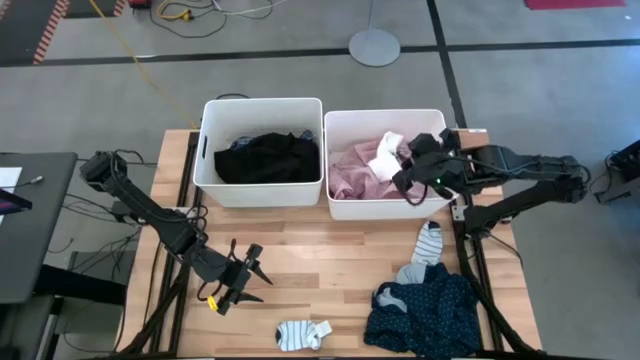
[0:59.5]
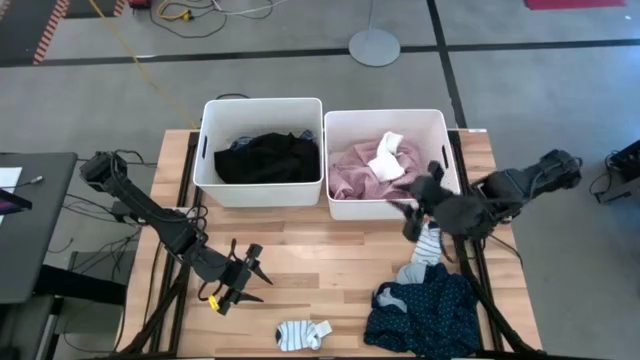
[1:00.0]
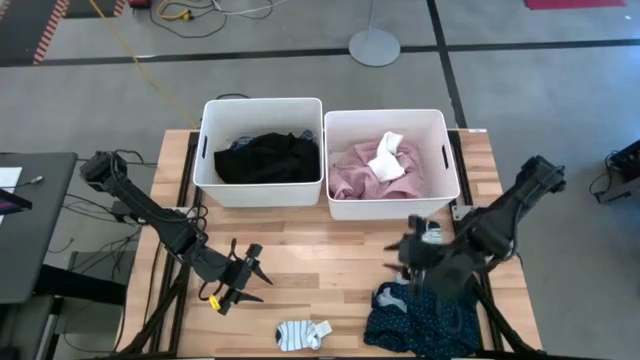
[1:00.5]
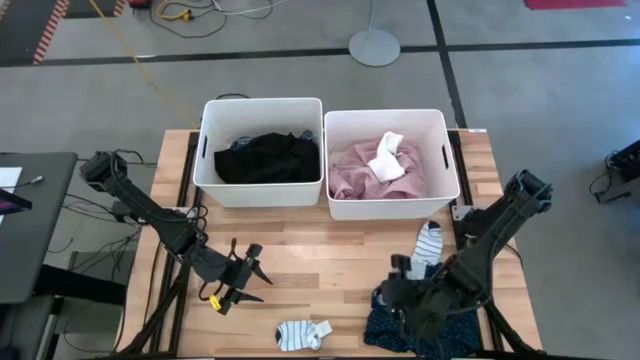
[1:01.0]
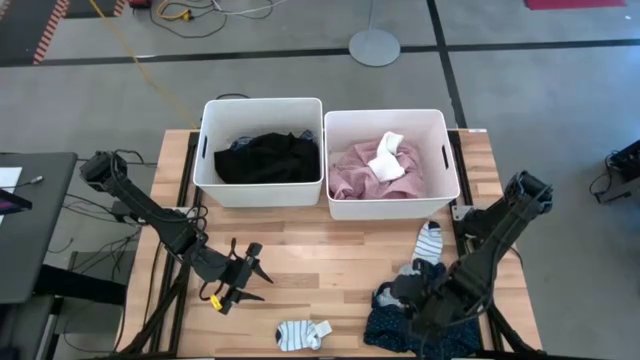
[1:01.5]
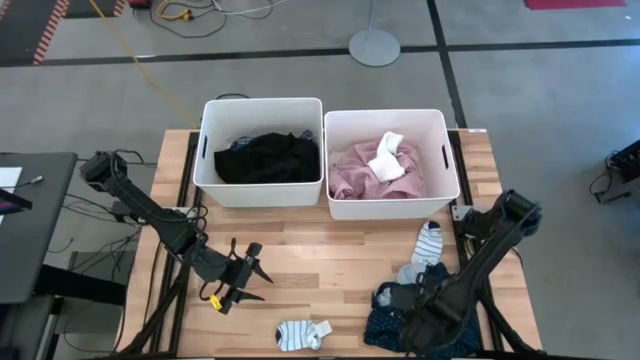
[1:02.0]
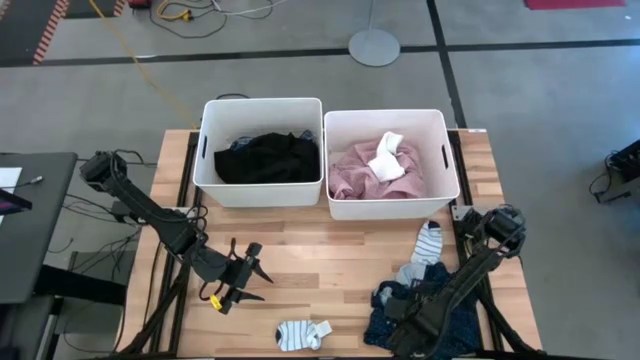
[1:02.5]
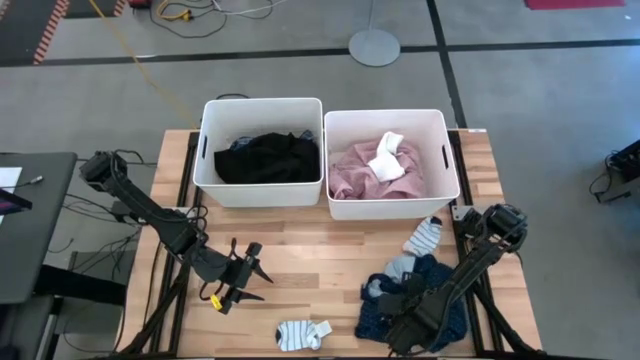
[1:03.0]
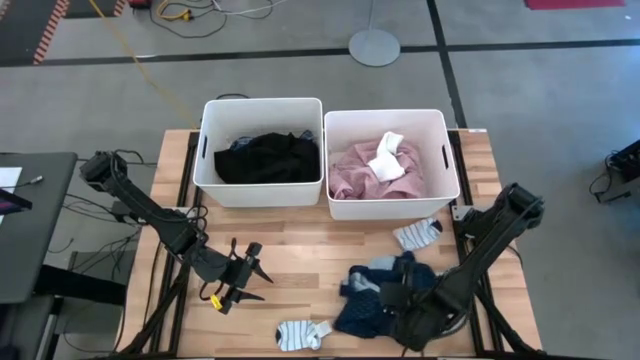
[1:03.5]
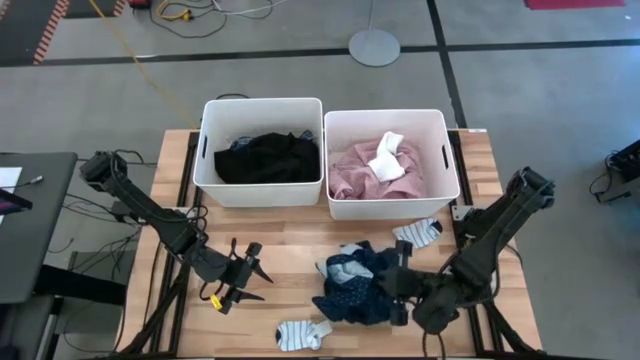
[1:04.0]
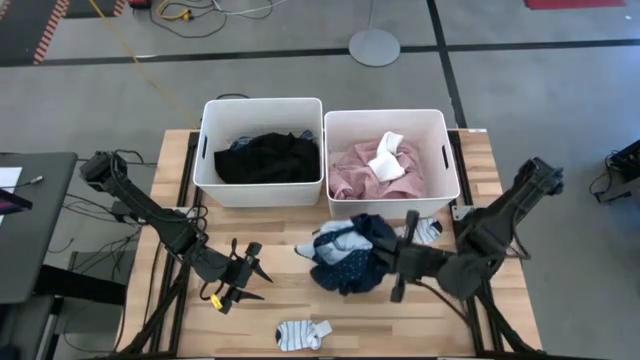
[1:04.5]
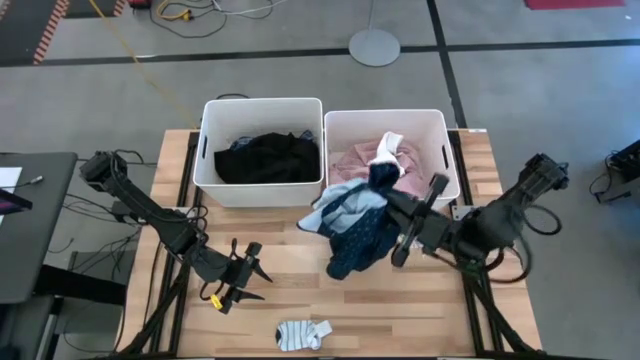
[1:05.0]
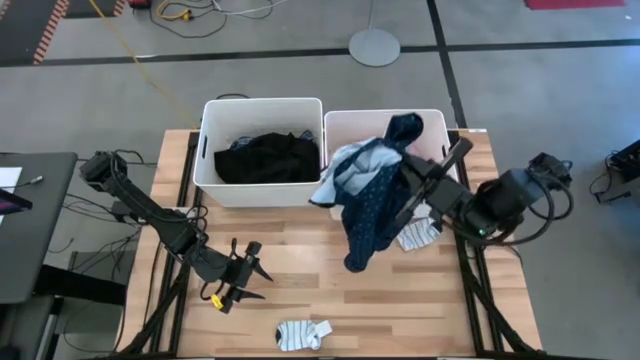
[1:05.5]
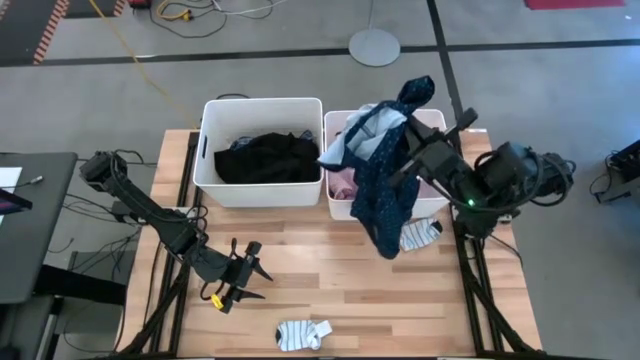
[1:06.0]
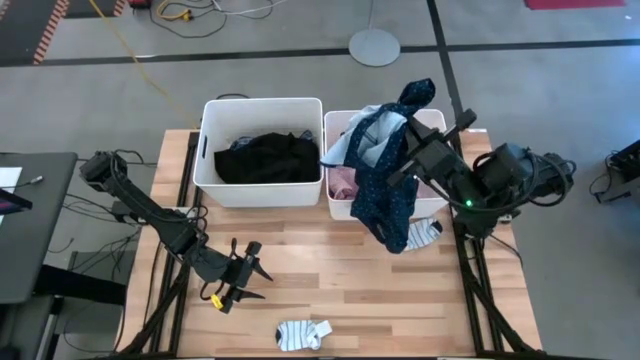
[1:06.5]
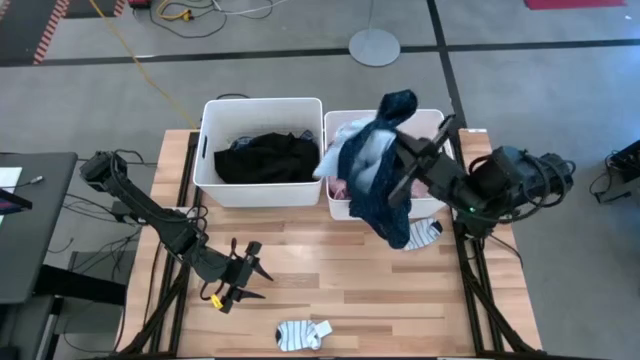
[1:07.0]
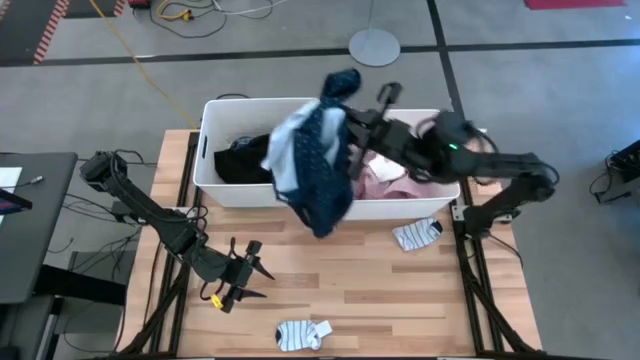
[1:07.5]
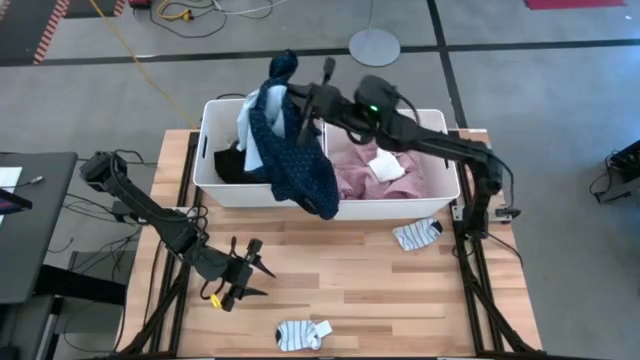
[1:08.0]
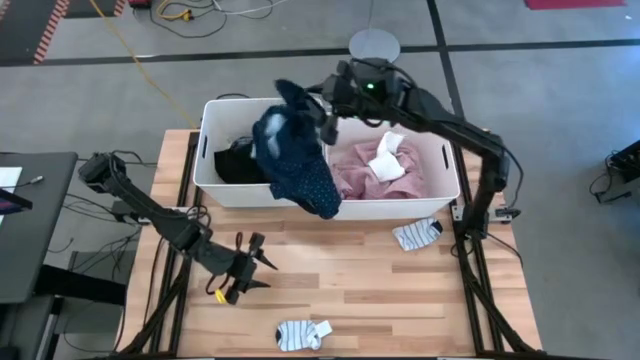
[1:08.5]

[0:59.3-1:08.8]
Task: Sort clothes
Put the blue shirt into the left white laundry organizer

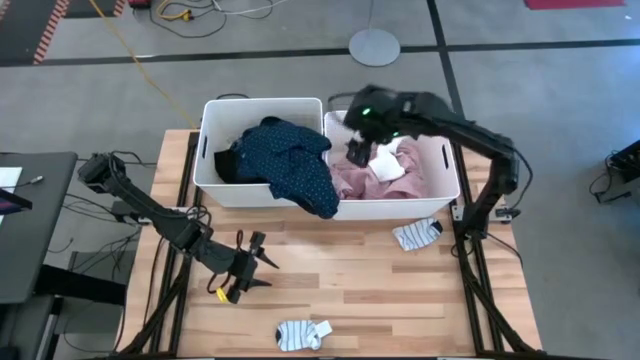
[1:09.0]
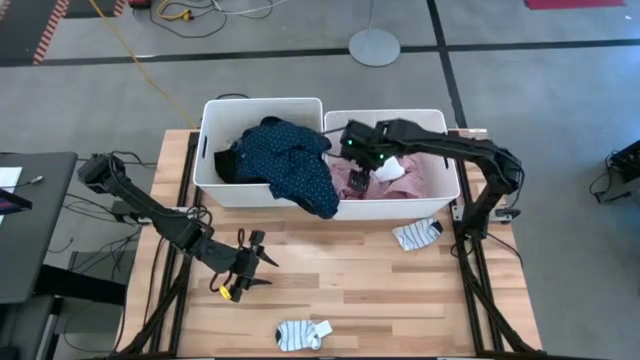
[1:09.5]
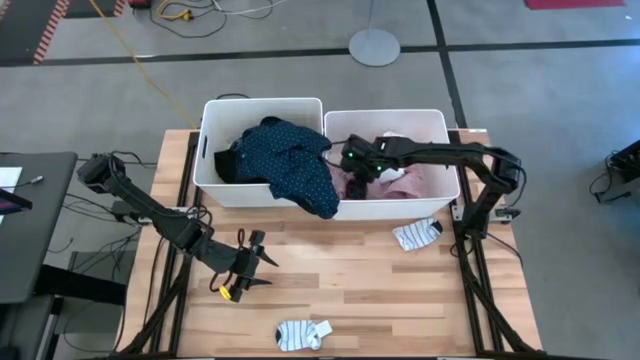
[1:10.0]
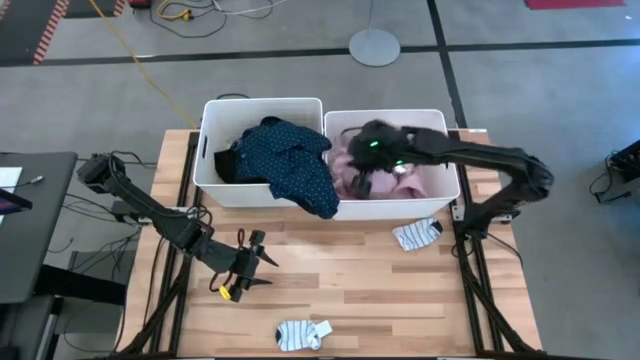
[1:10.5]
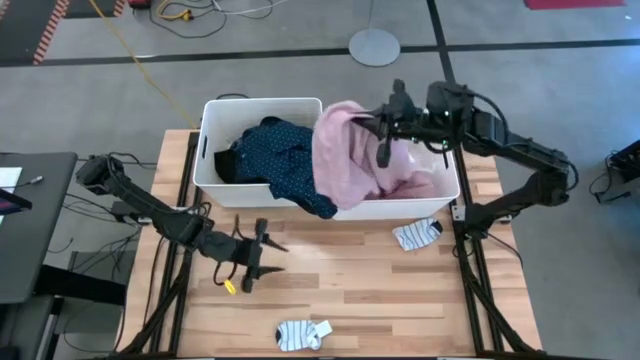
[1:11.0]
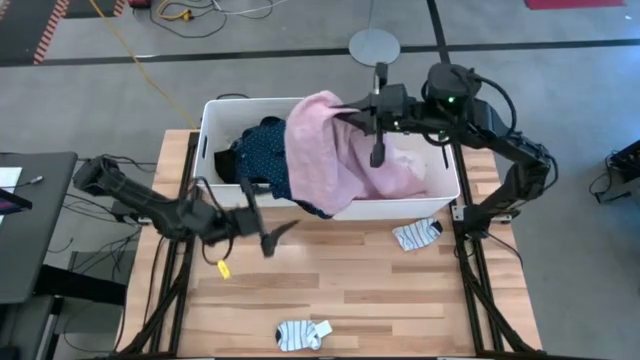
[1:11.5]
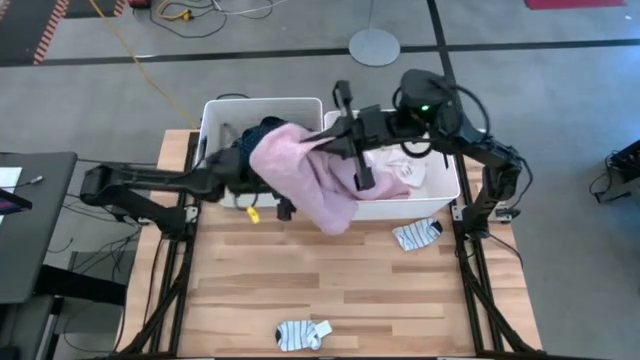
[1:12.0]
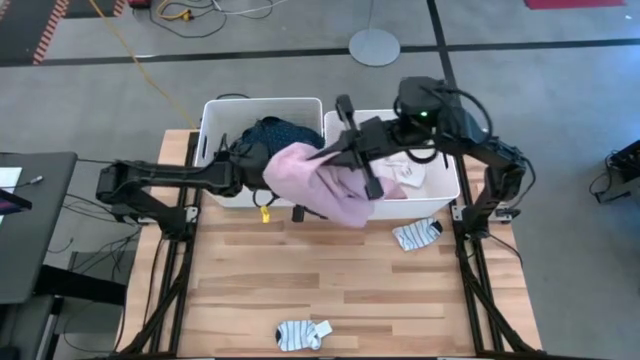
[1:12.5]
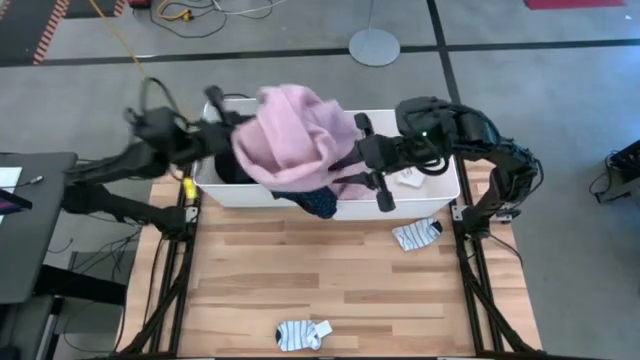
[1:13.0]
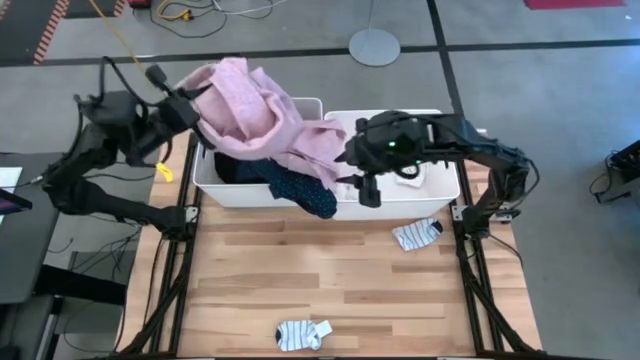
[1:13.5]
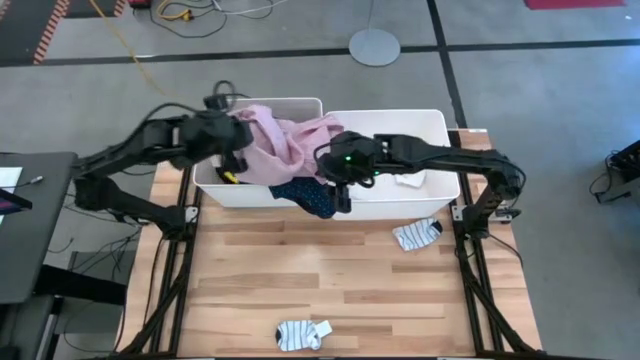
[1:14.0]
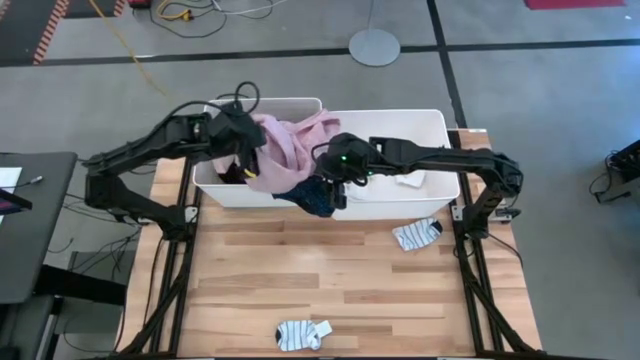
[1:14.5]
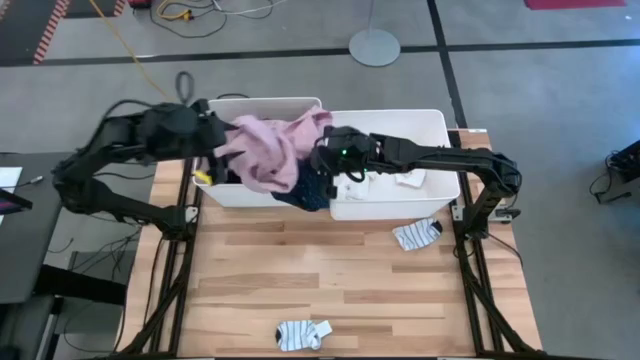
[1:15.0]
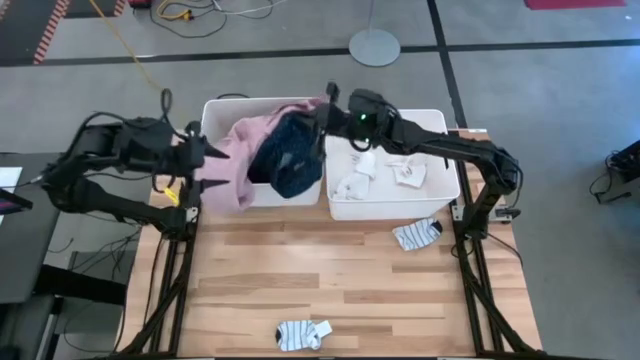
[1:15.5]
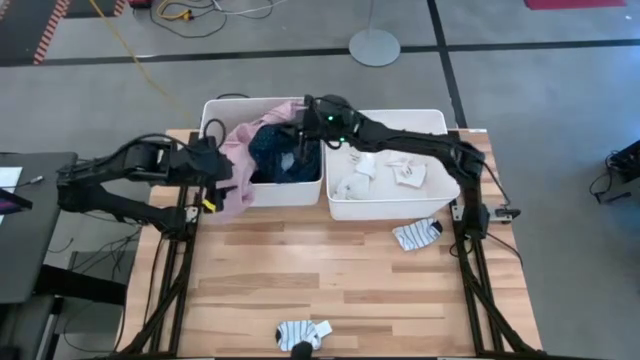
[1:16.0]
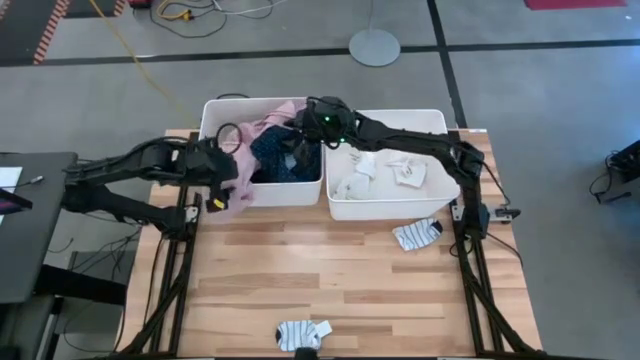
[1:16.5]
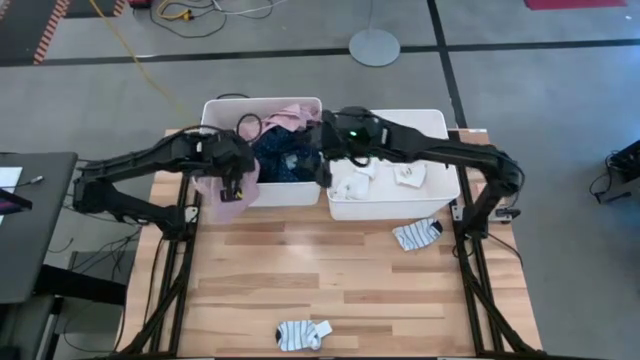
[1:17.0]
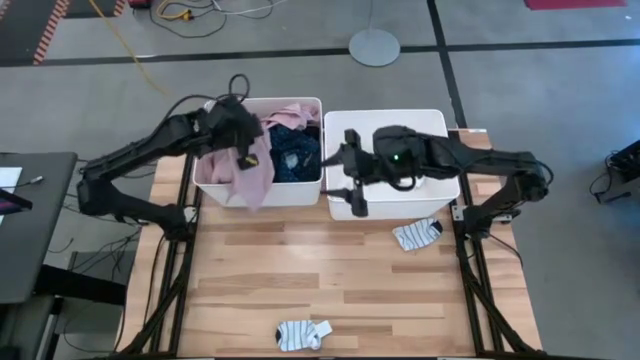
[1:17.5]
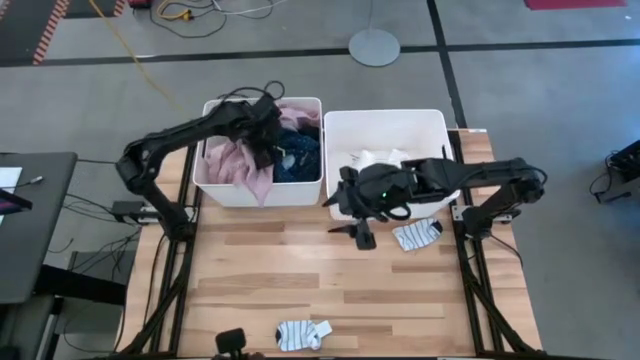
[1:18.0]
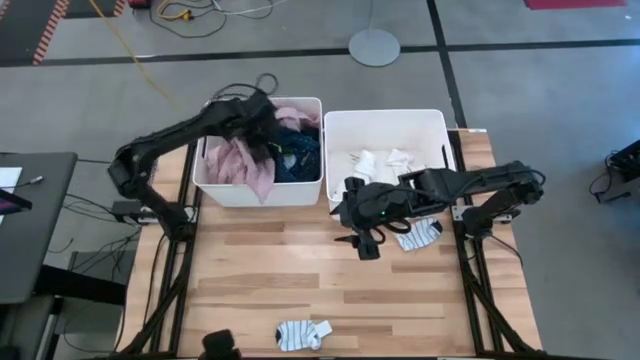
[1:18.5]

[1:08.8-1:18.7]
Put the pink shirt into the left white laundry organizer

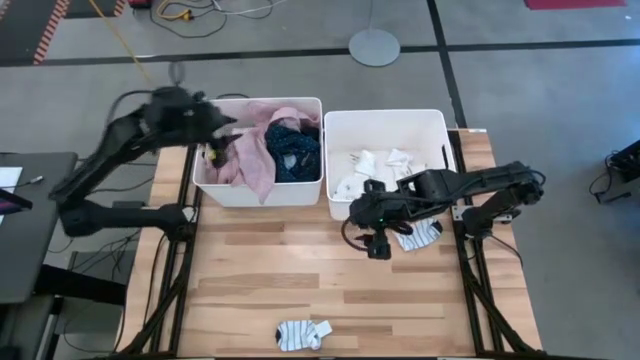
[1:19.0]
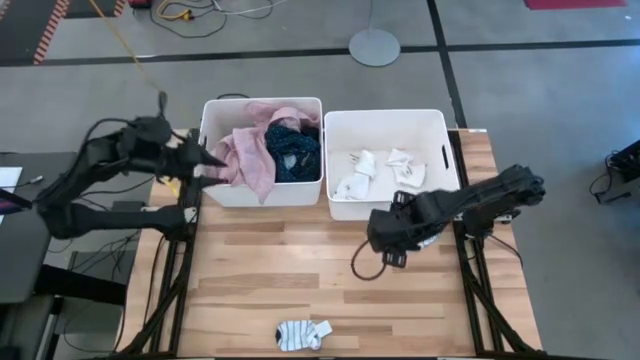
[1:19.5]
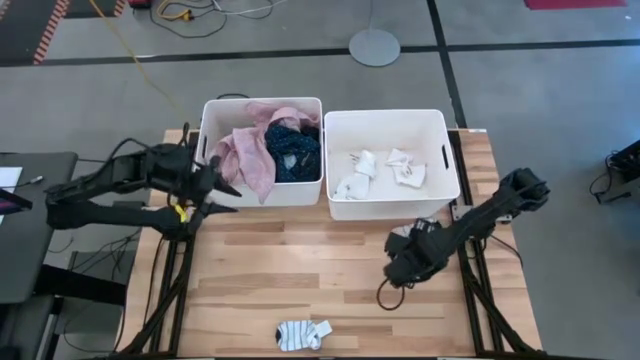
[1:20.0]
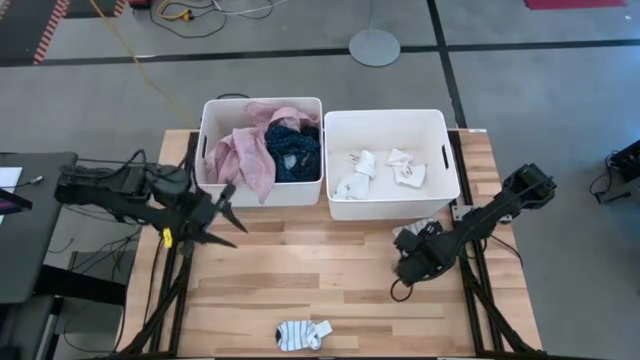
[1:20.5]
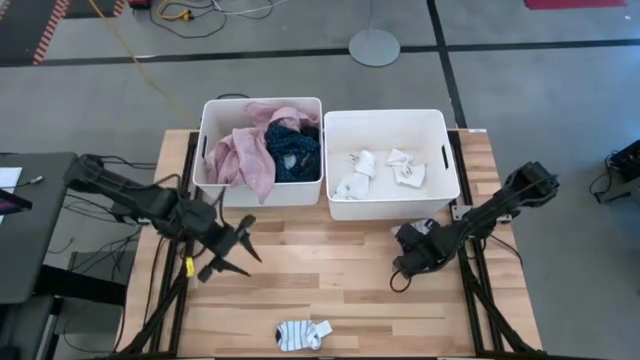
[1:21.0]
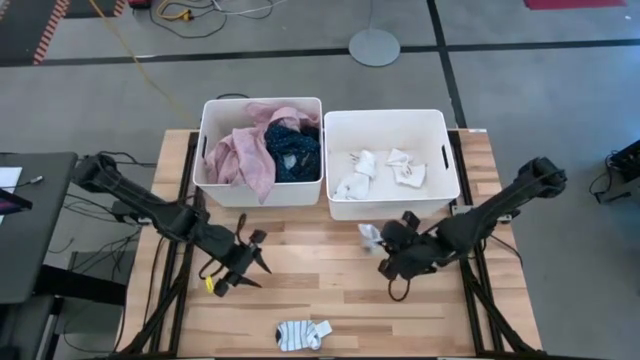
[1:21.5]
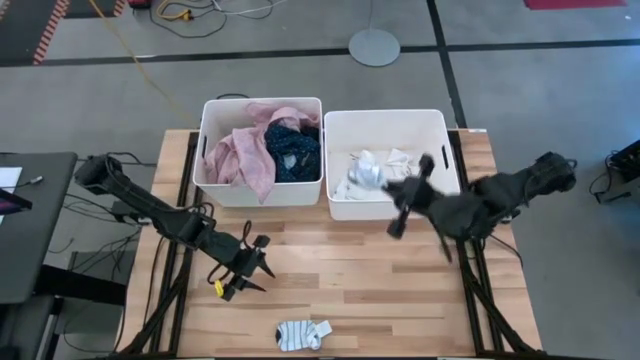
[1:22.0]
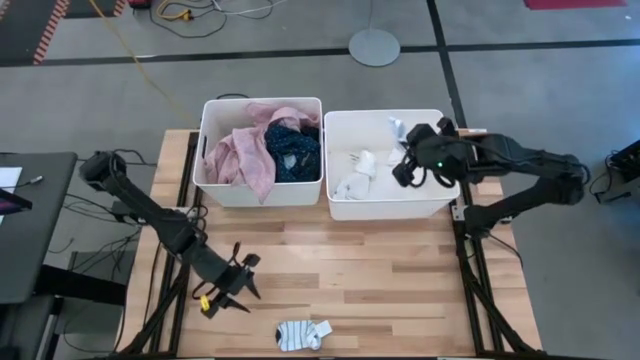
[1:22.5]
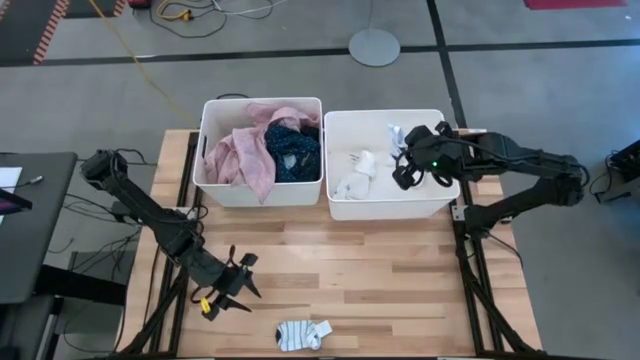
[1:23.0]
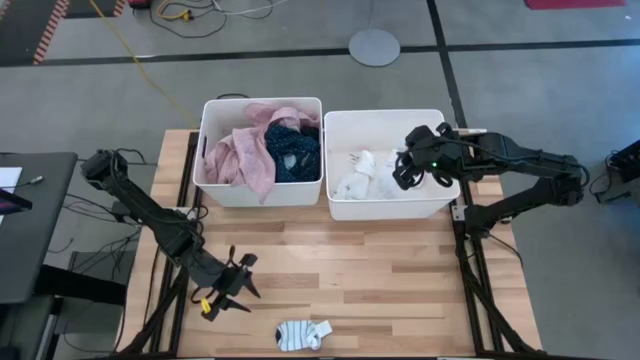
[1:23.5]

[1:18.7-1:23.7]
Put the top blue sock into the right white laundry organizer
